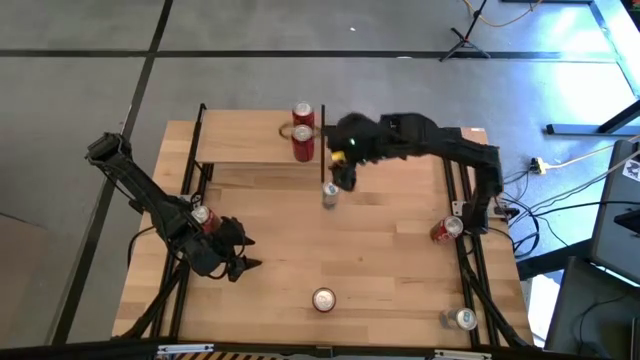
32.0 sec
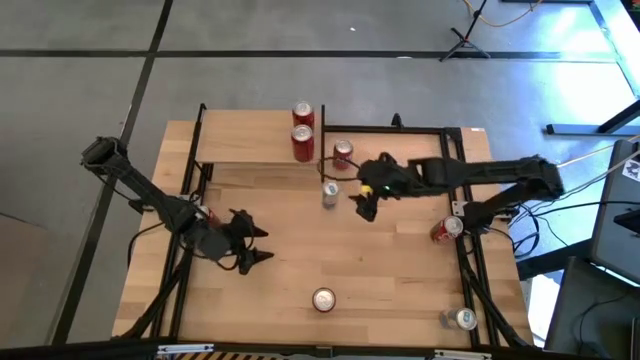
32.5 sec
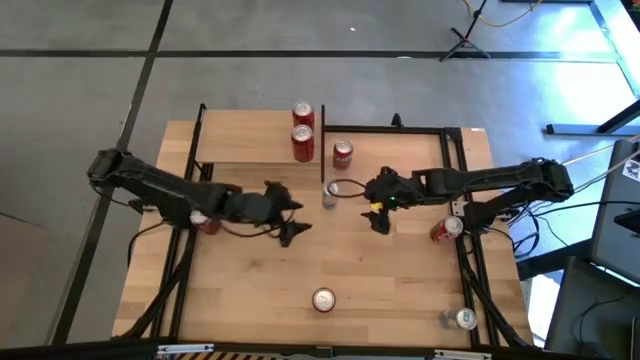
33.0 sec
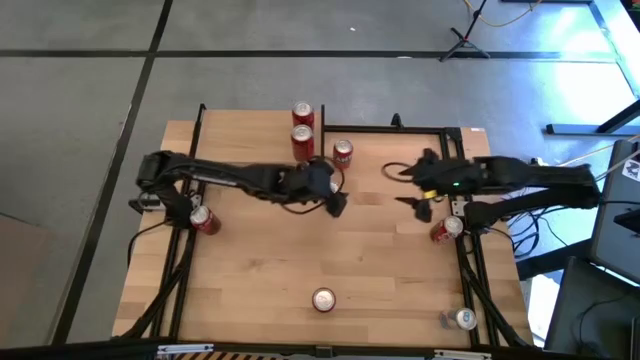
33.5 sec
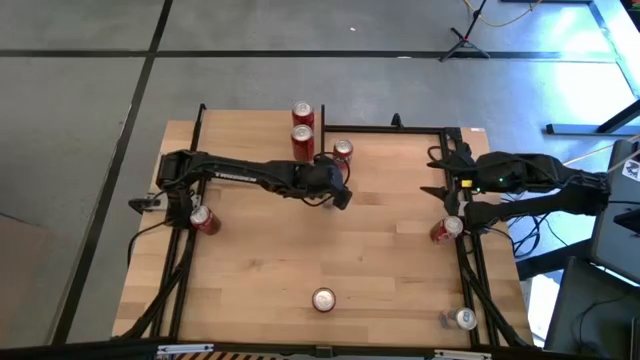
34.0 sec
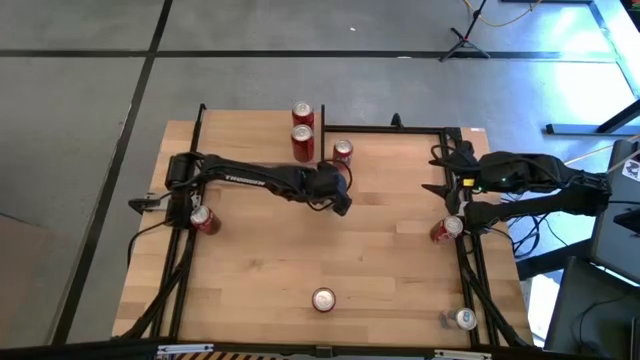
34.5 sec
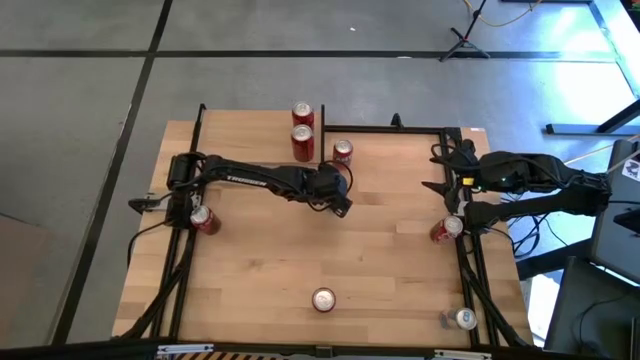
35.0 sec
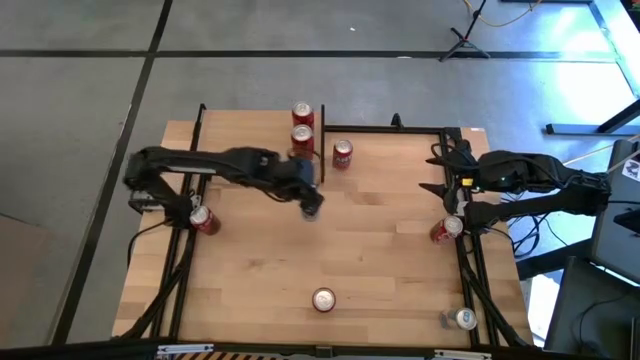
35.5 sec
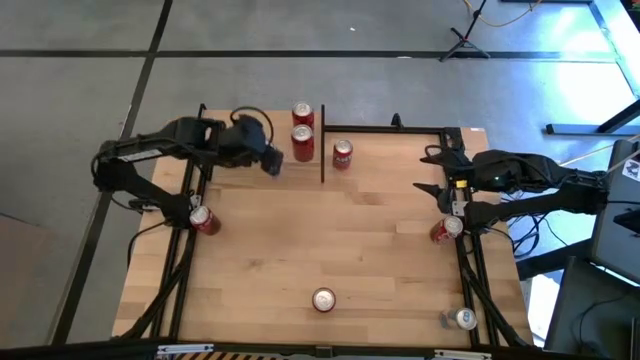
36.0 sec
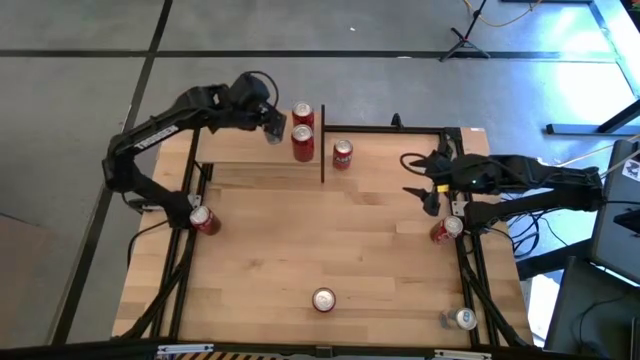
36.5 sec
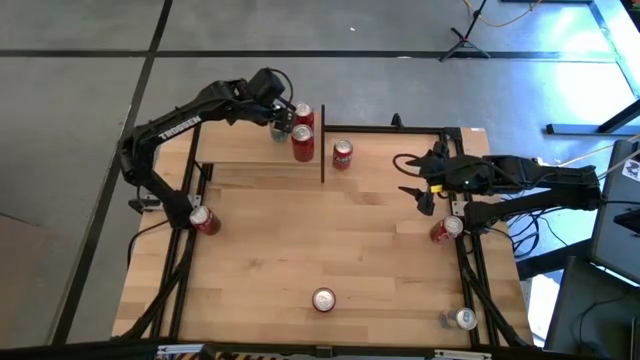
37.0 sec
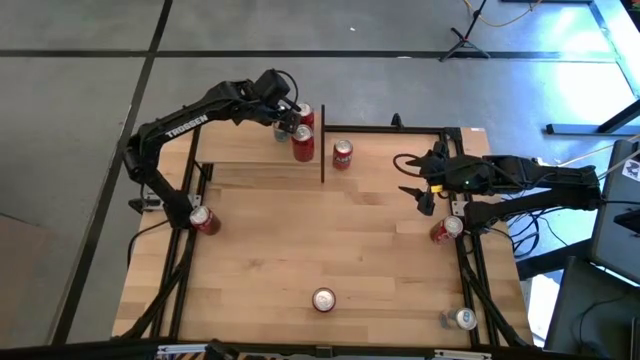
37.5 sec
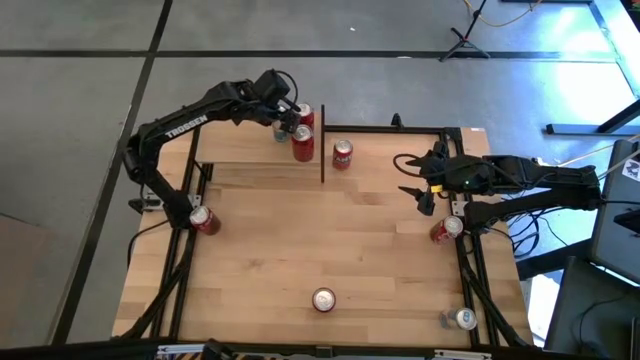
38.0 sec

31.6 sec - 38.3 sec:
Task: Place canned beverage on shelf
Put the top blue soda can on the shelf

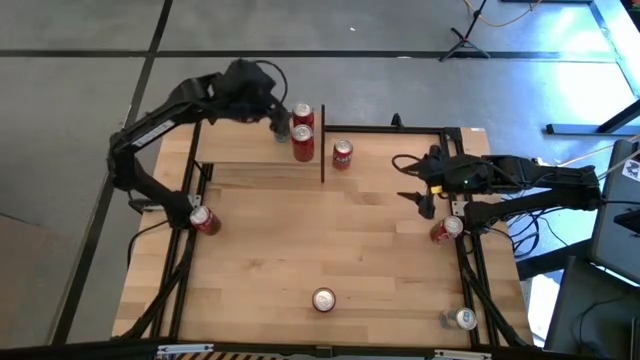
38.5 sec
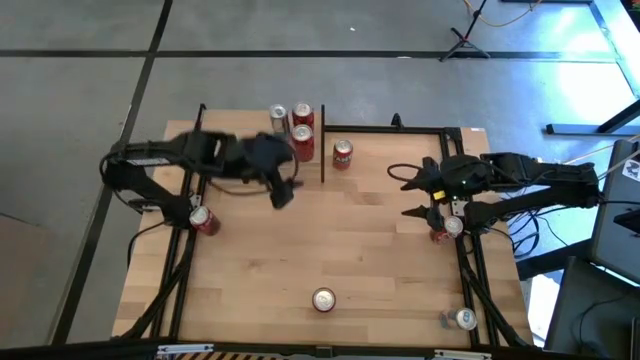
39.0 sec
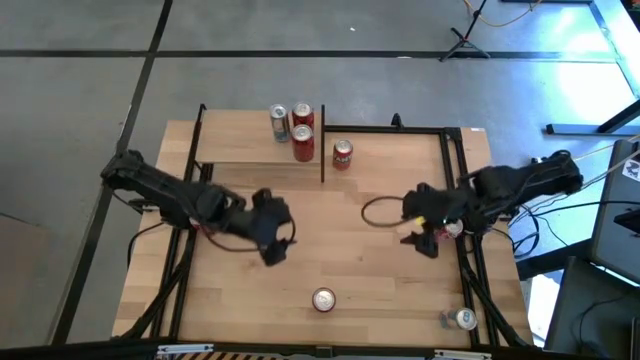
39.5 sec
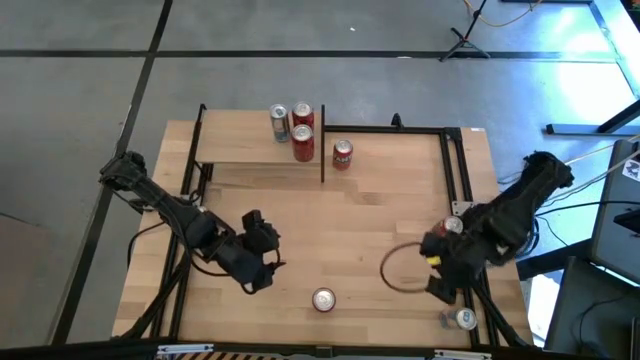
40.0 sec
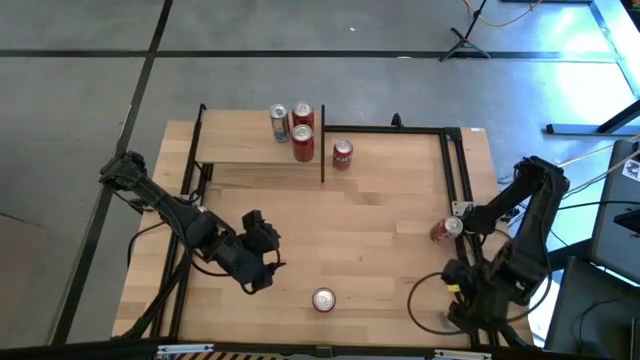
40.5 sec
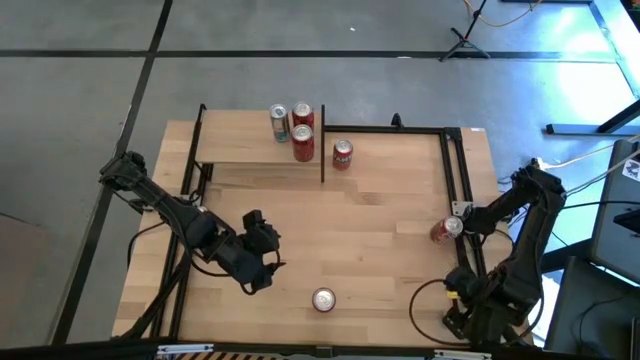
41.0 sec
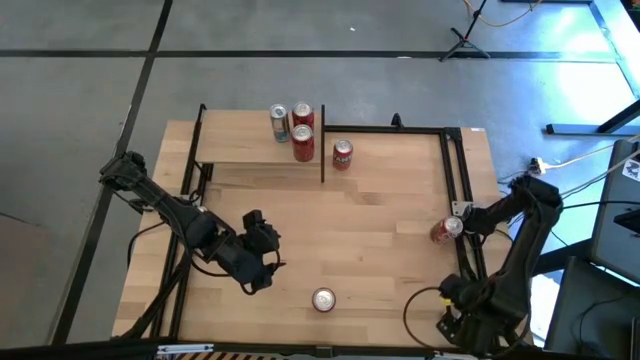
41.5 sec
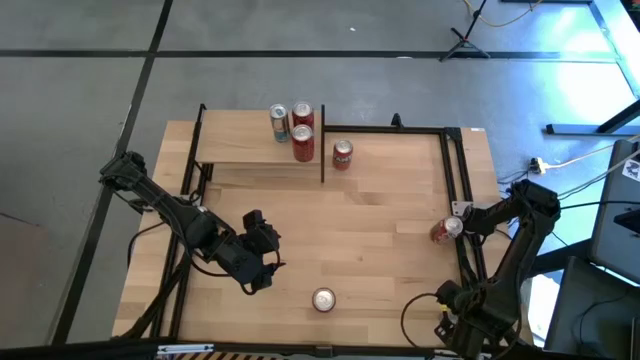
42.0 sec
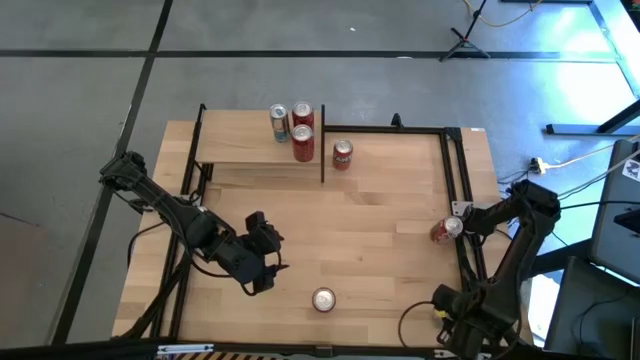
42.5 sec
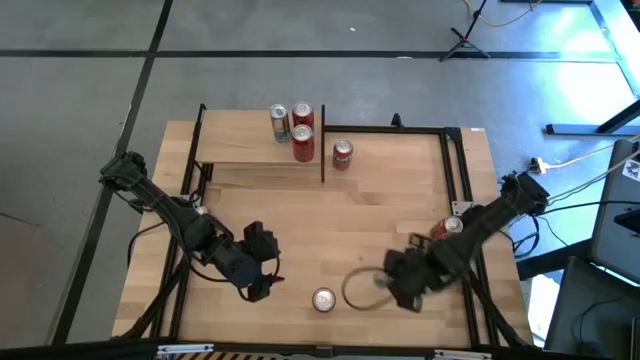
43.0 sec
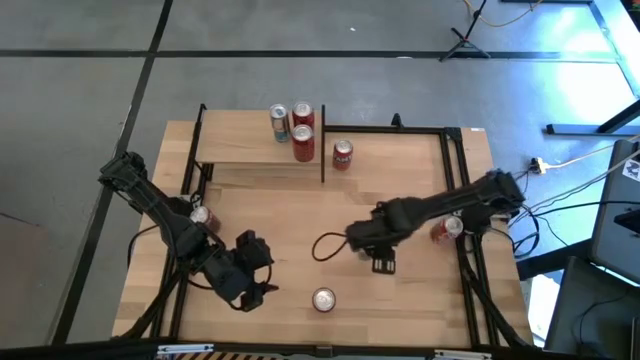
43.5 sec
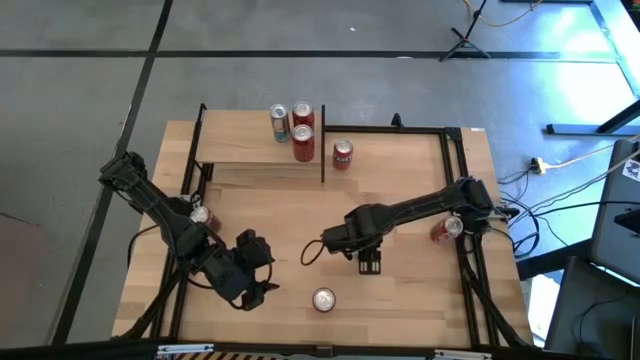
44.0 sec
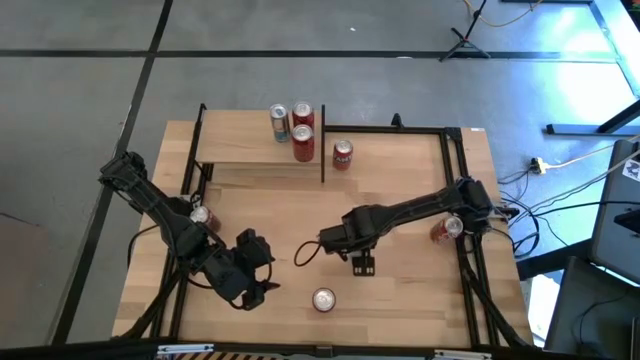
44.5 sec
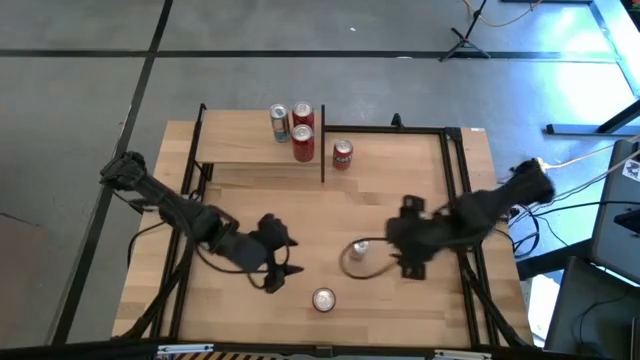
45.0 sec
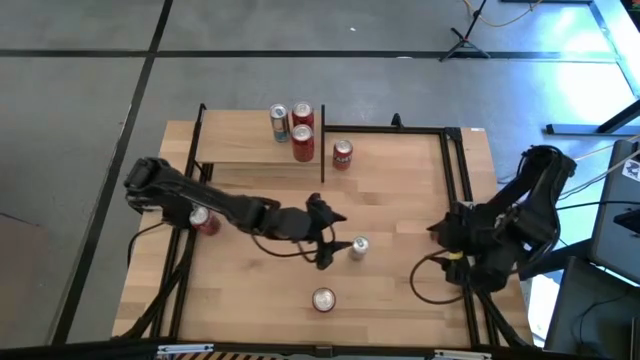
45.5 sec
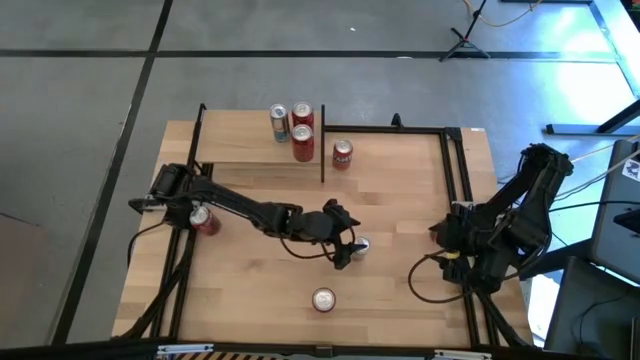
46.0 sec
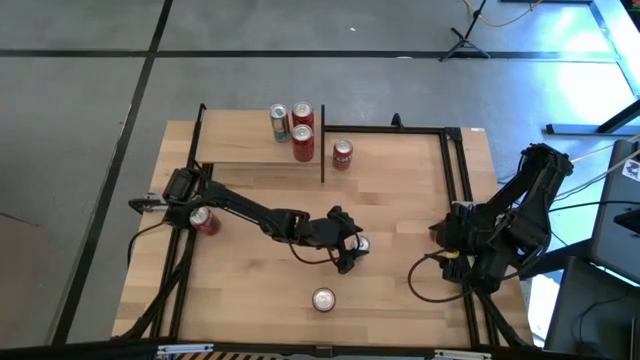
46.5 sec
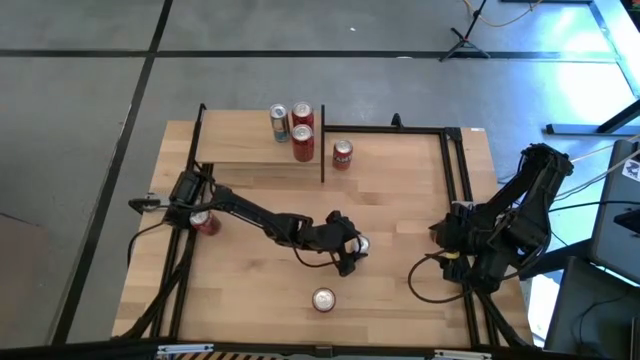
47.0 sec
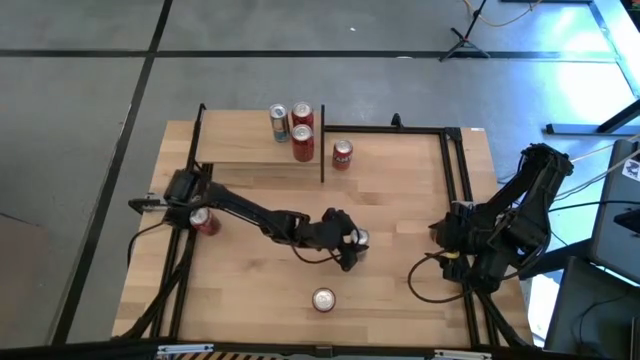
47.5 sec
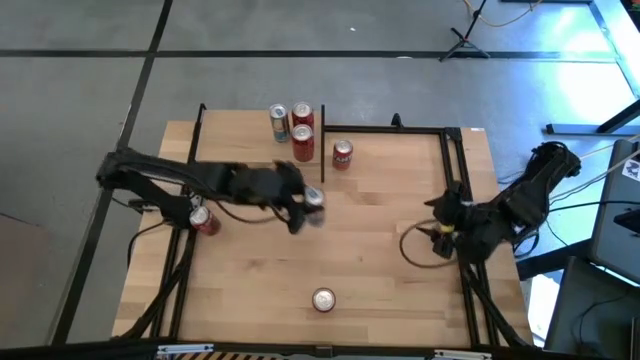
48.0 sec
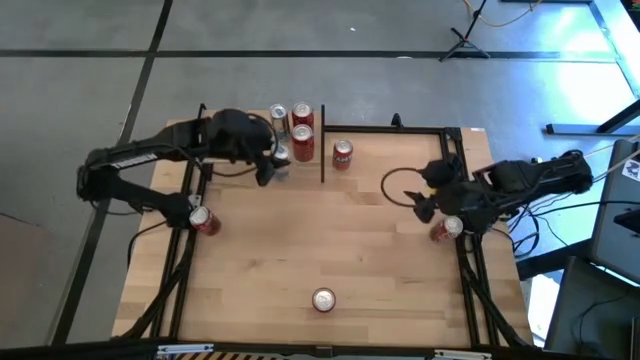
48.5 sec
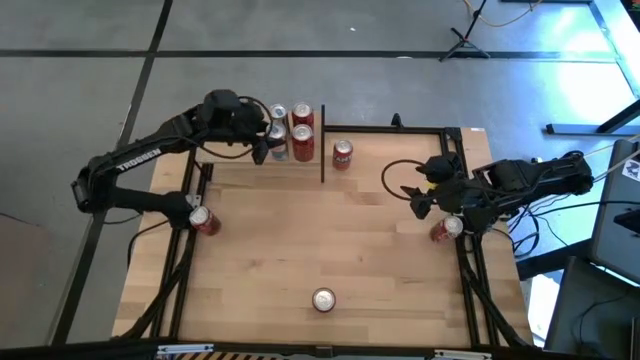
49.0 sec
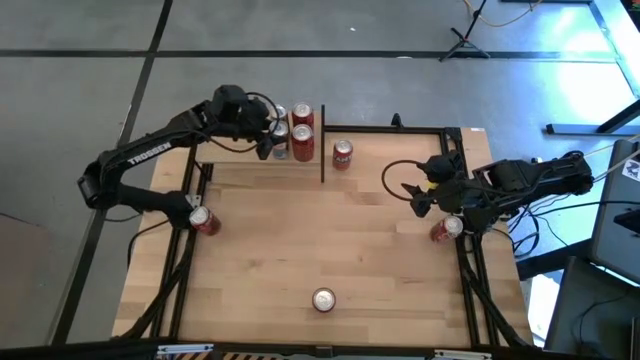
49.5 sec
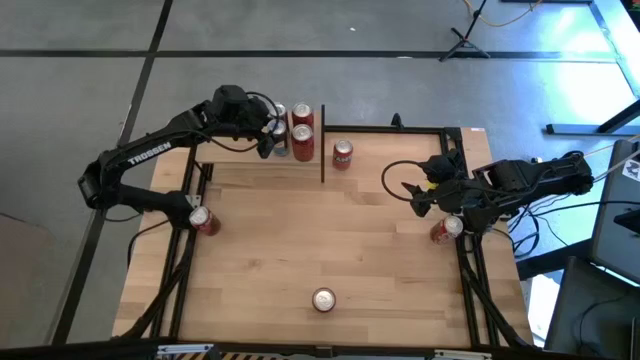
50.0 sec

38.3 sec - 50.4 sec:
Put the blue soda can on the shelf aligned with the other blue soda can

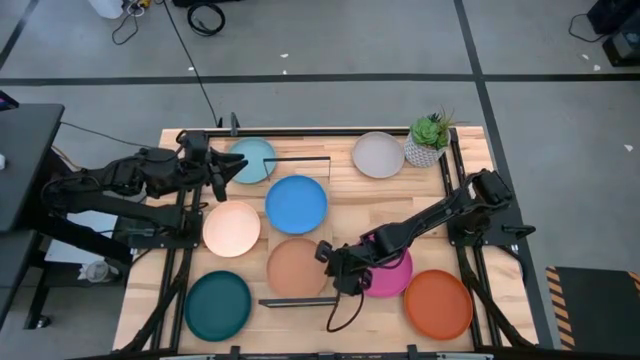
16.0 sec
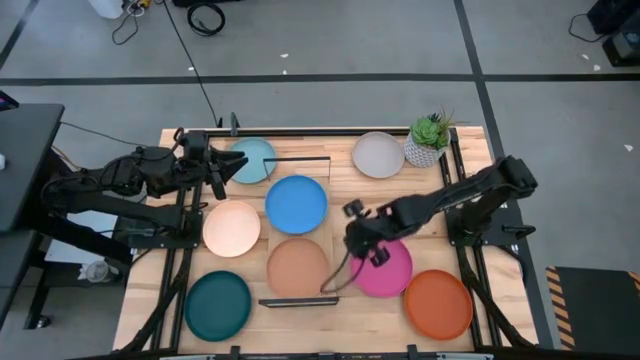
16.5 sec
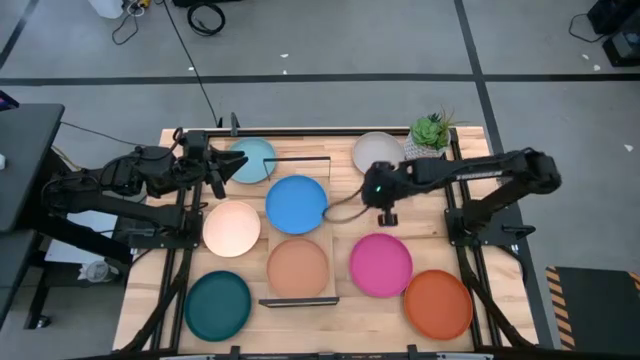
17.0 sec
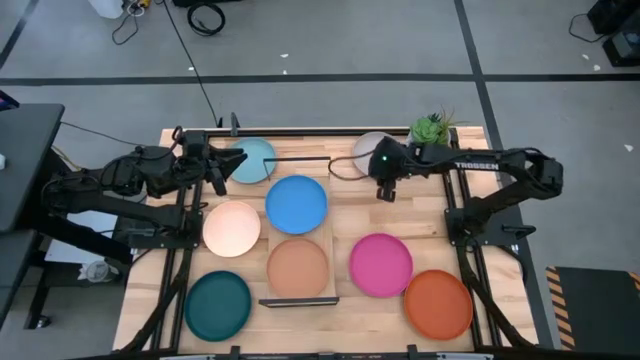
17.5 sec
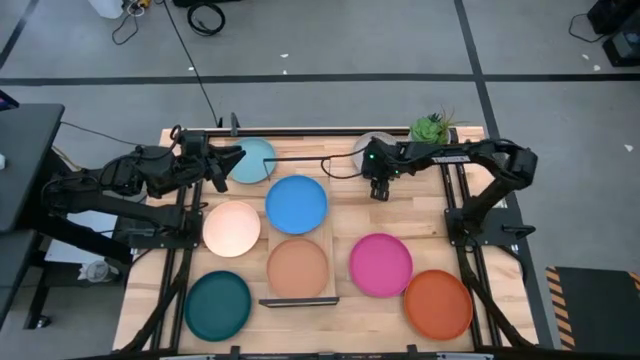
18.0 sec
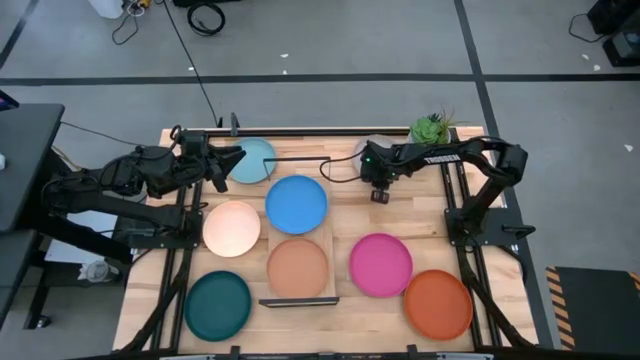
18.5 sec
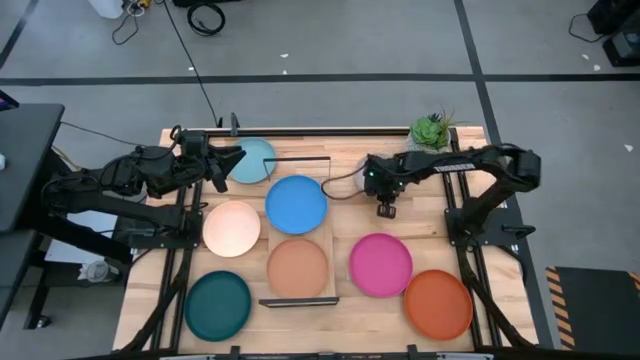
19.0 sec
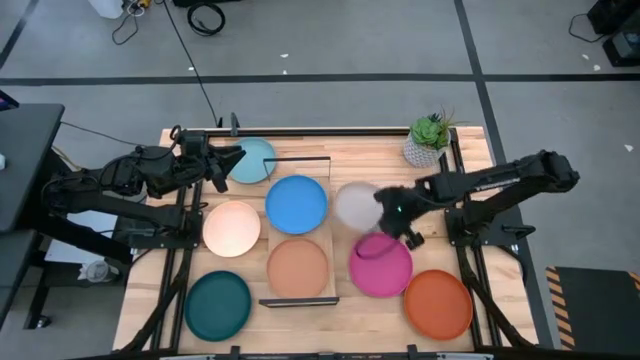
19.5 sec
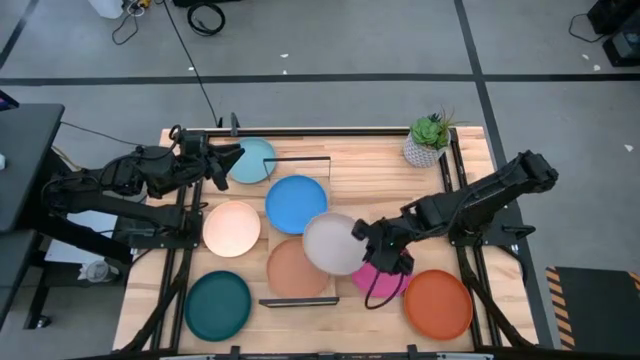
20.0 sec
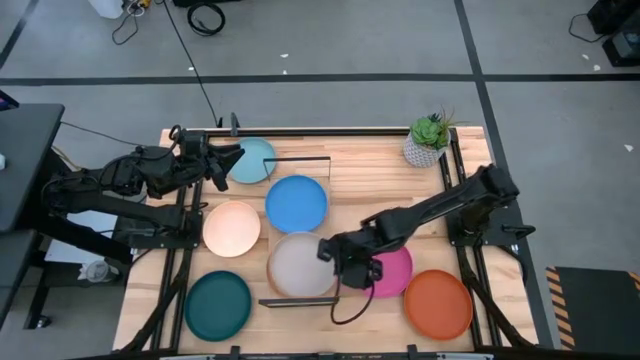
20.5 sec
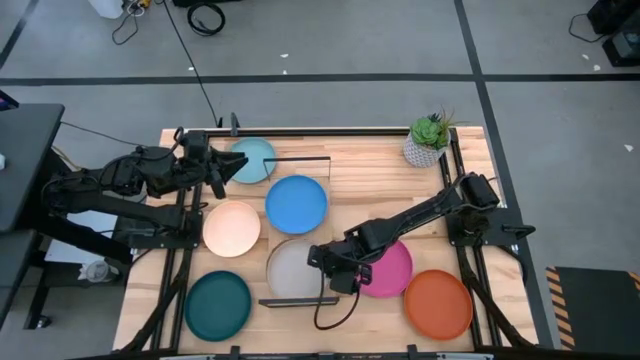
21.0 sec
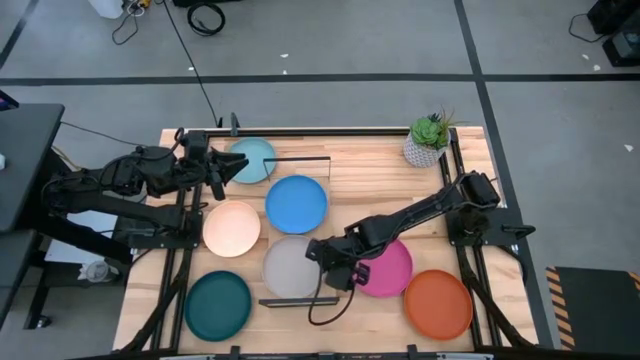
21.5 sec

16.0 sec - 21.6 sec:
Task: Place and stack plates onto a shelf
Stack the gray plate on top of the brown plate on the shelf
